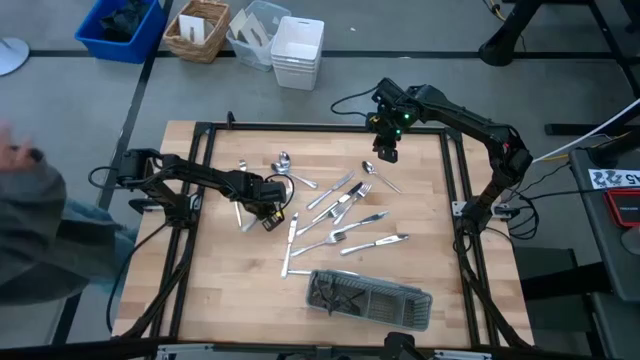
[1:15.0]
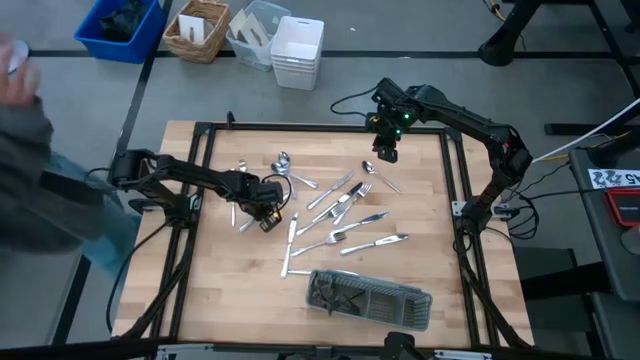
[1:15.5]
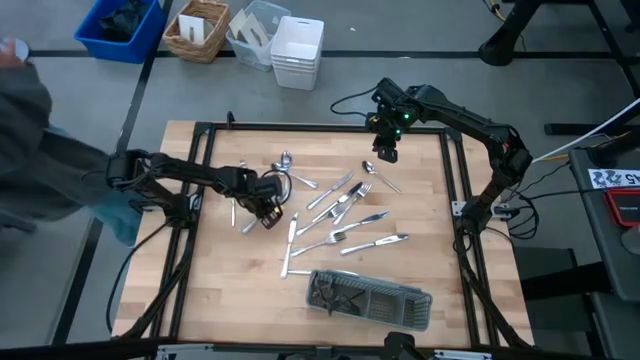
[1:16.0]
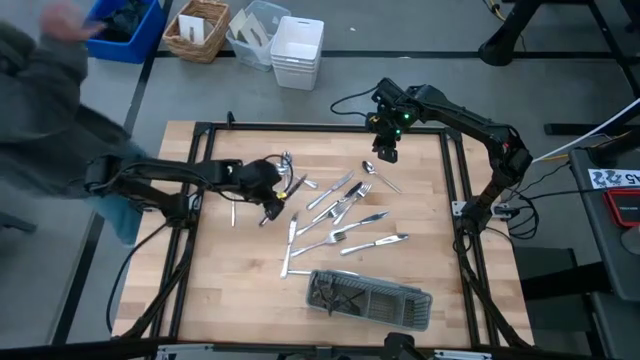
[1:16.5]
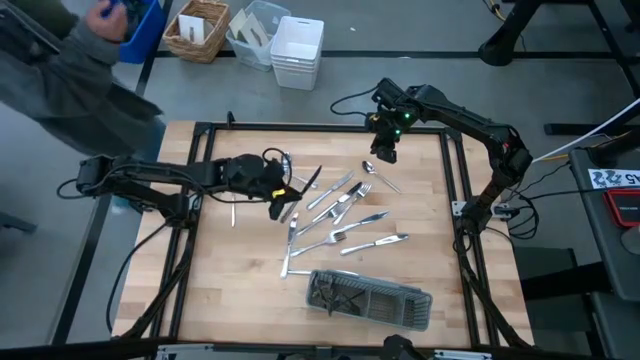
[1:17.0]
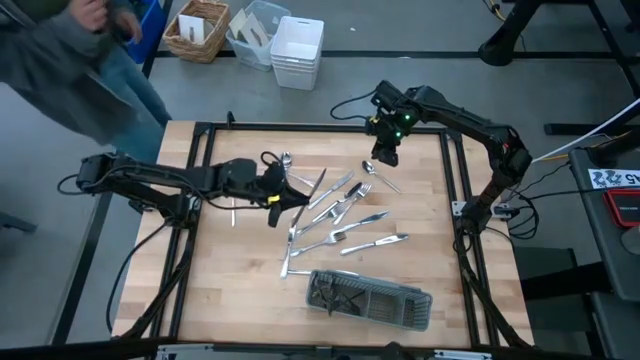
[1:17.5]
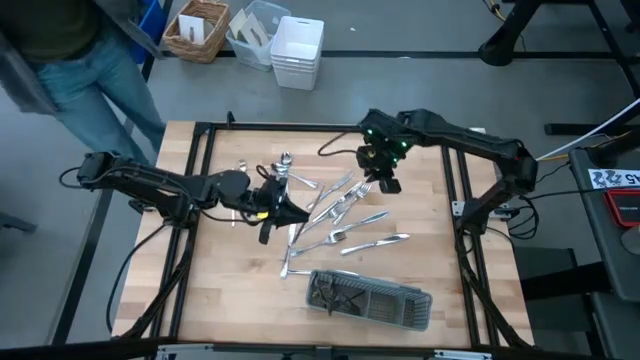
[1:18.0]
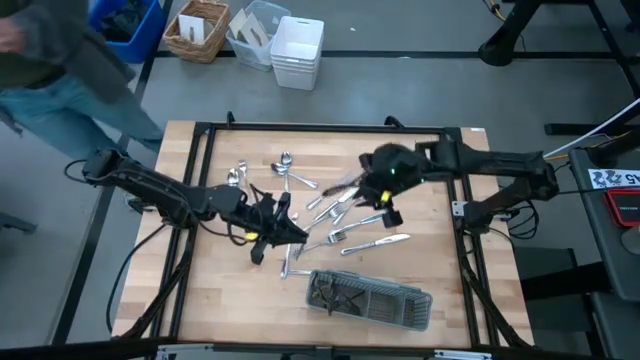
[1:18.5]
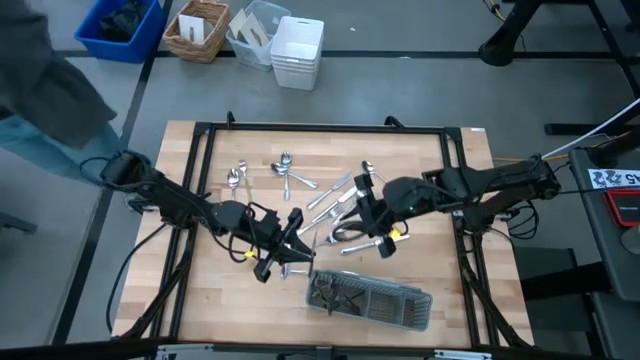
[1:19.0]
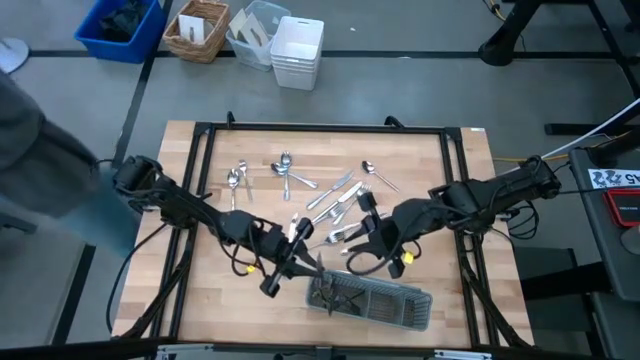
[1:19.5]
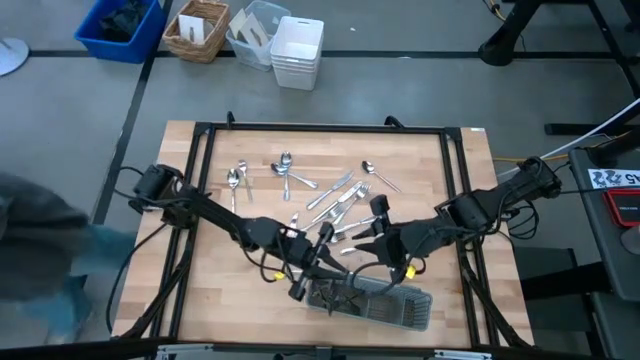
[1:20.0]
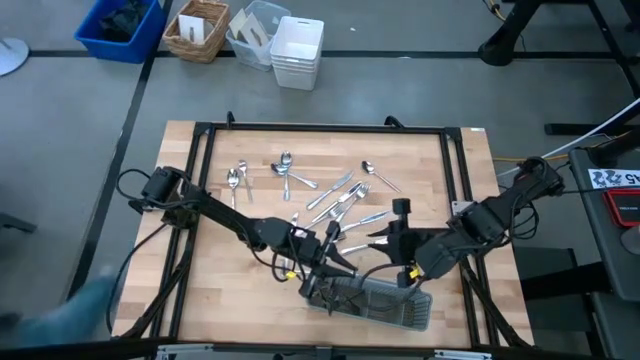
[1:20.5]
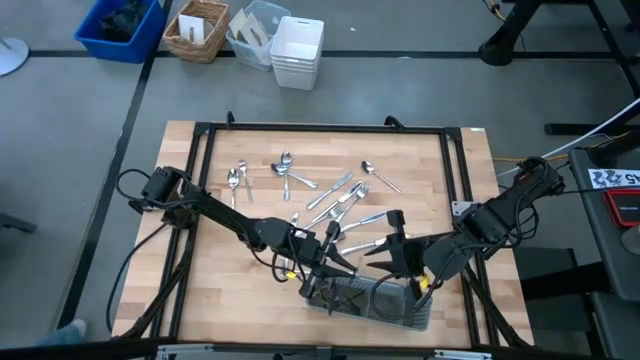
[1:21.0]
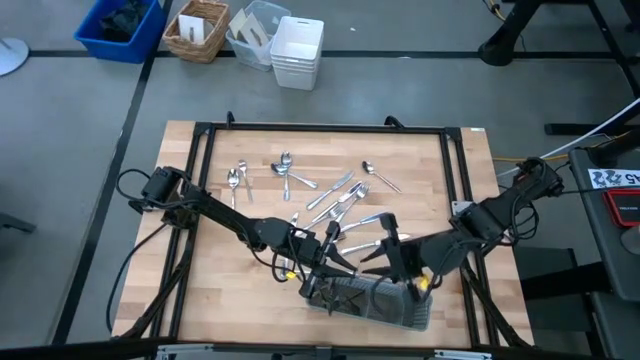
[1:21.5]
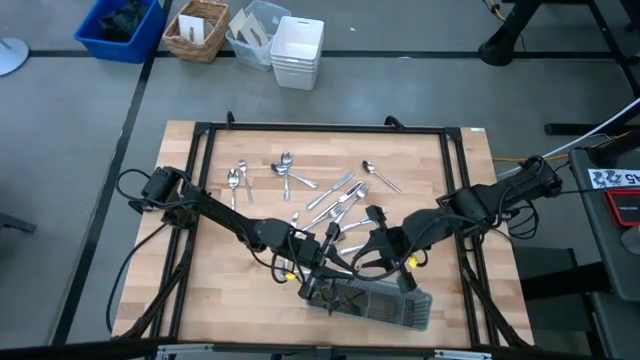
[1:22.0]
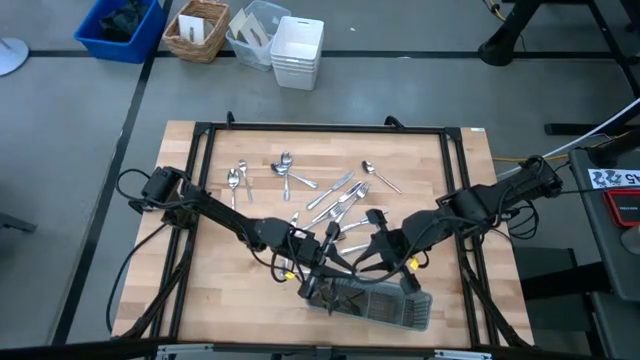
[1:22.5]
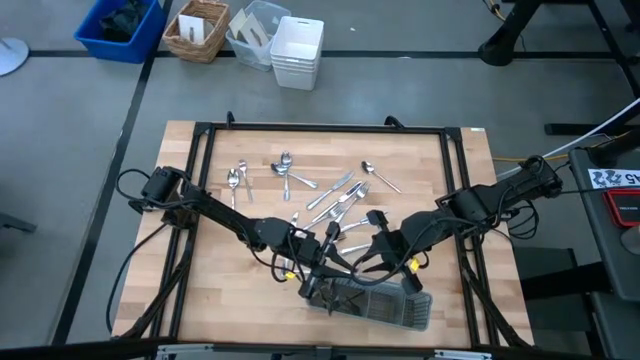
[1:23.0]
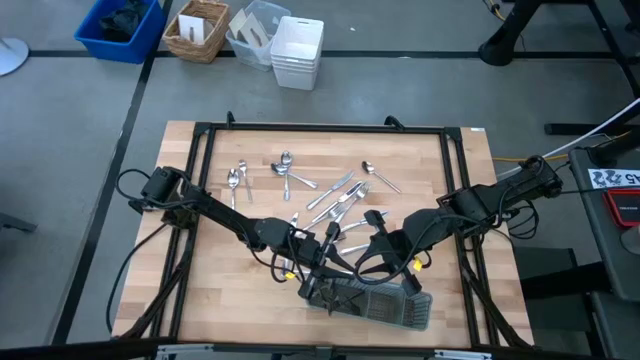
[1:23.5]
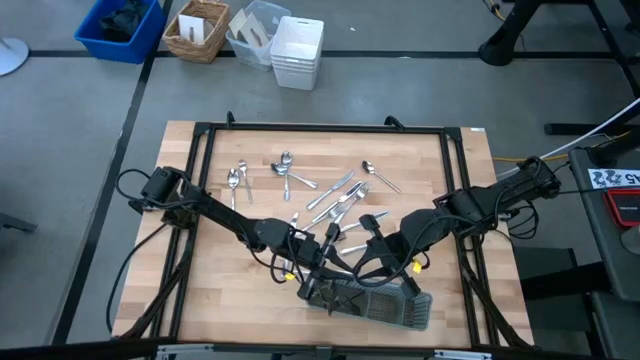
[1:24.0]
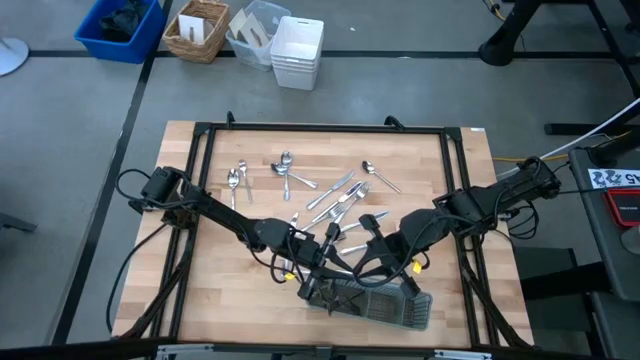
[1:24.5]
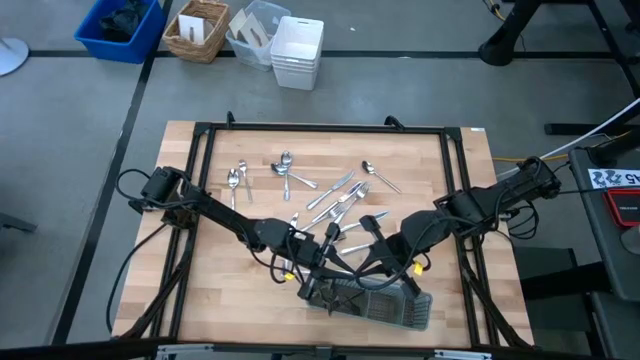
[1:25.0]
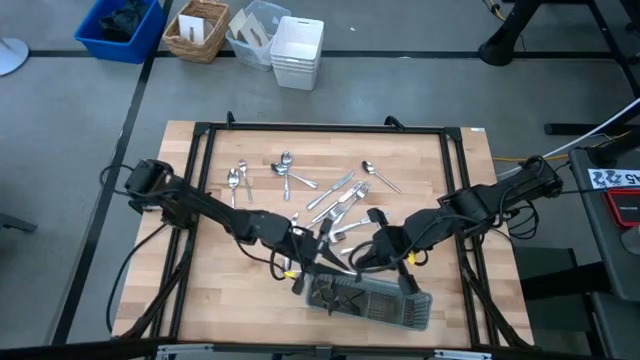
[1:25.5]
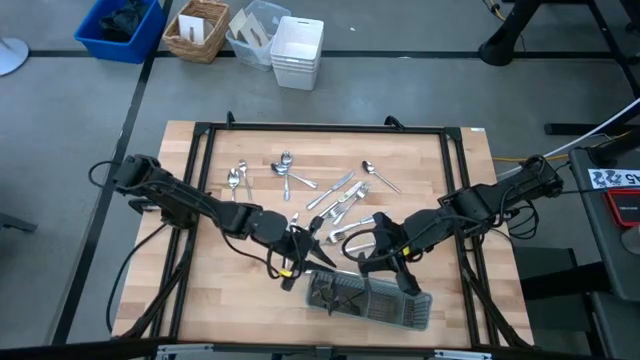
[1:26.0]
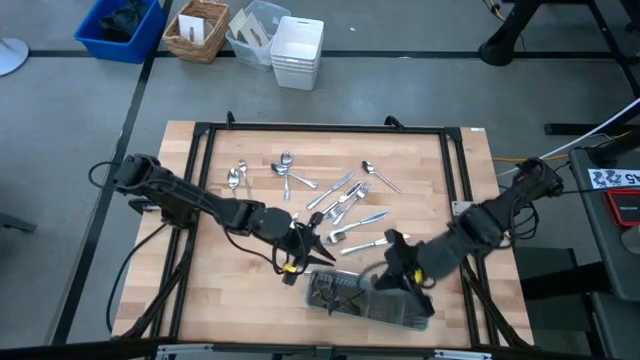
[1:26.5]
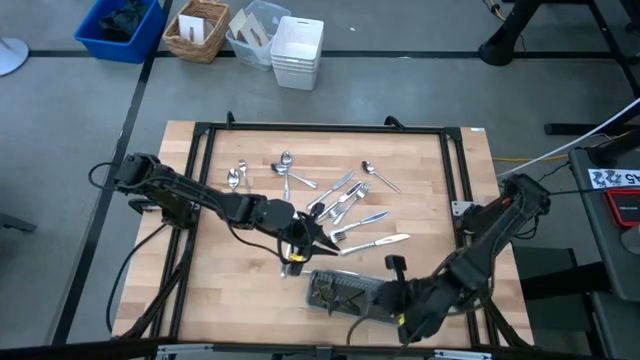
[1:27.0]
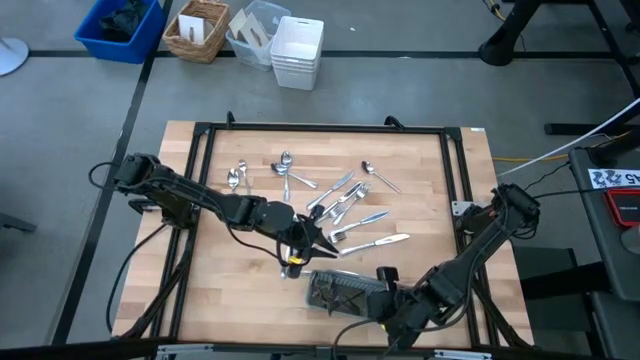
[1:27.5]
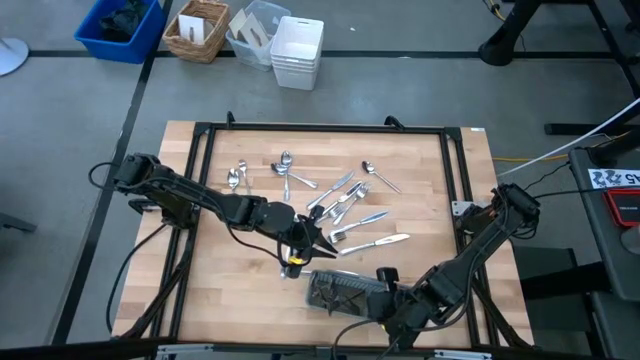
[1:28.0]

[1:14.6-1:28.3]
Task: Sort silverware
Put the knife into the gray silverware rack

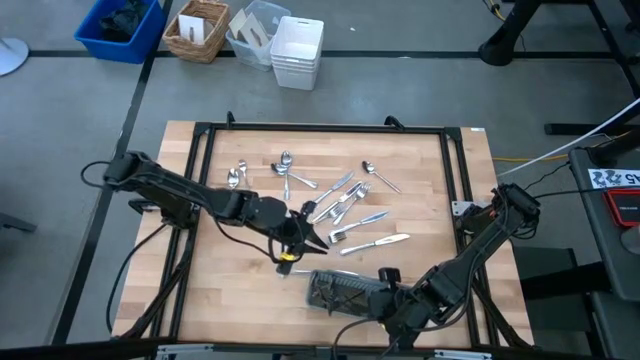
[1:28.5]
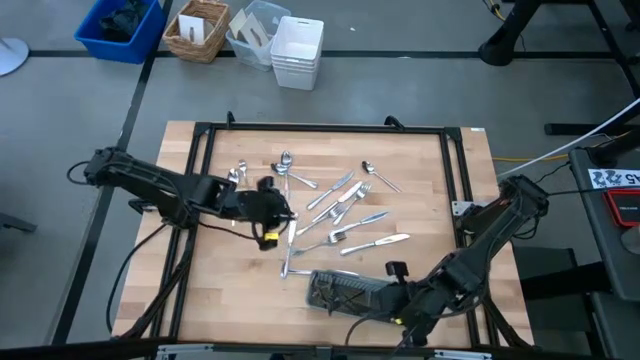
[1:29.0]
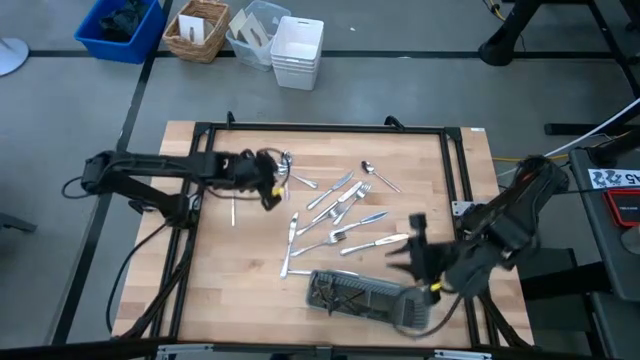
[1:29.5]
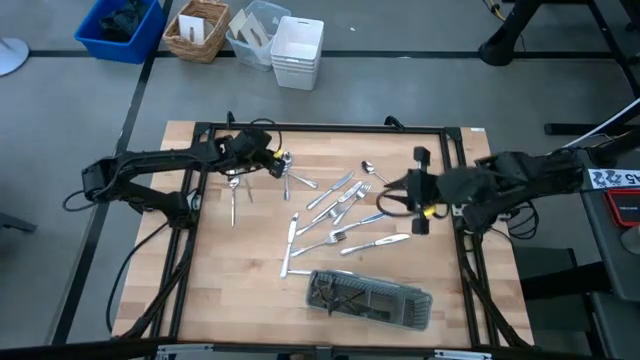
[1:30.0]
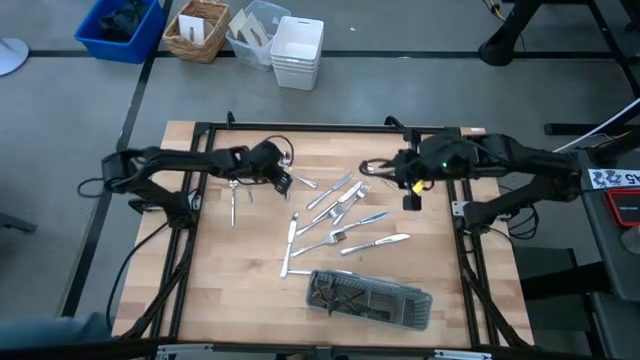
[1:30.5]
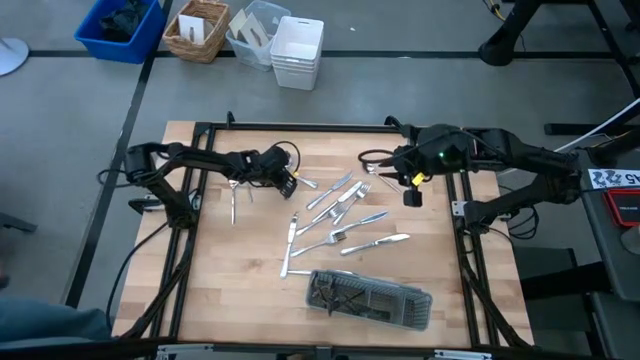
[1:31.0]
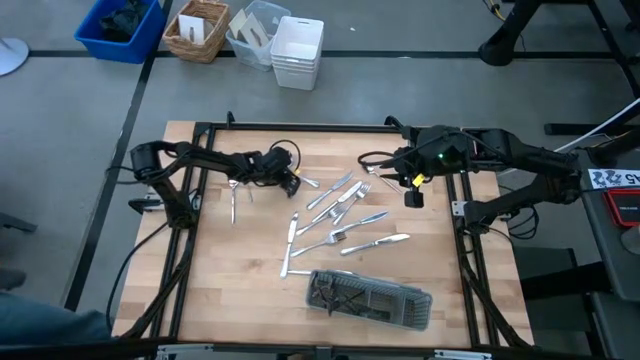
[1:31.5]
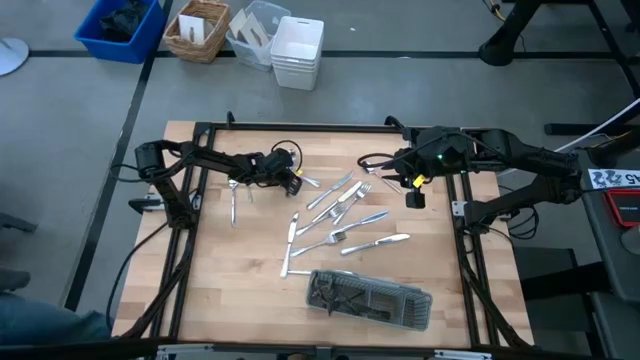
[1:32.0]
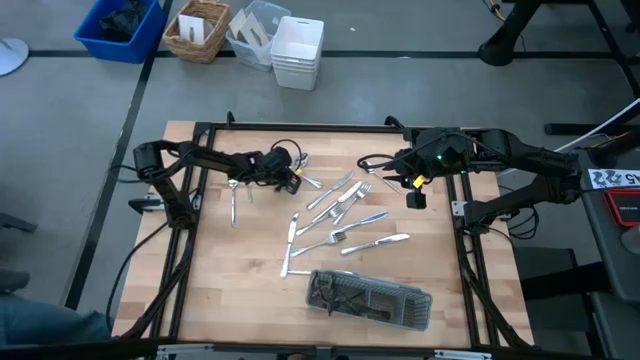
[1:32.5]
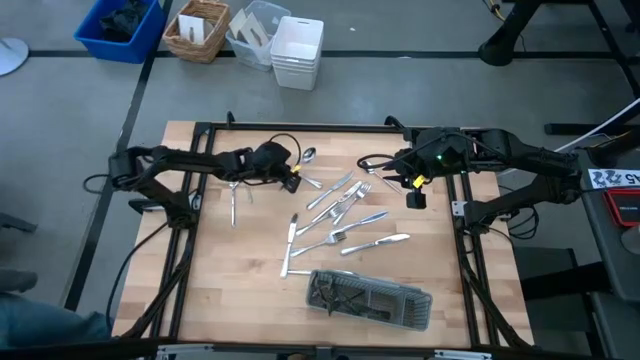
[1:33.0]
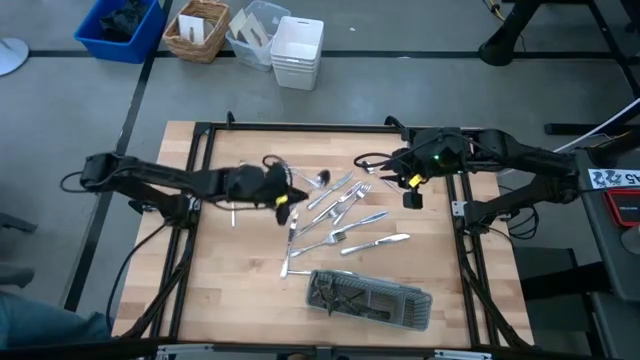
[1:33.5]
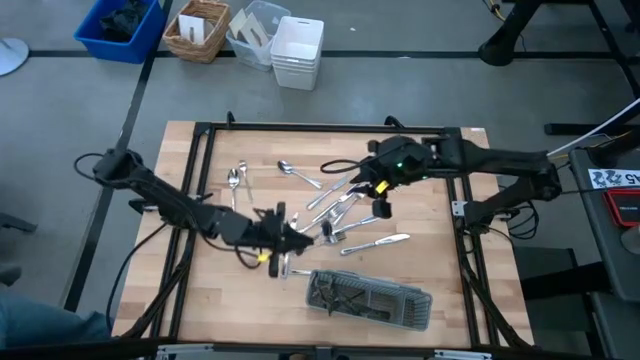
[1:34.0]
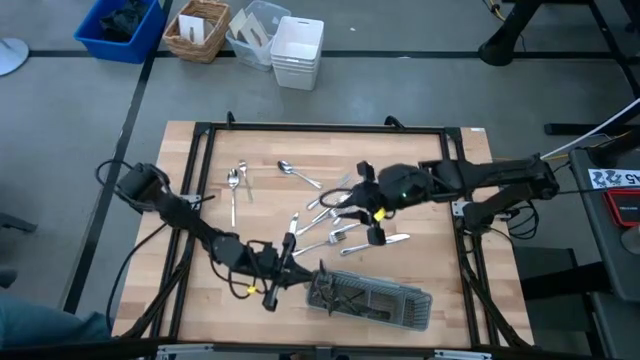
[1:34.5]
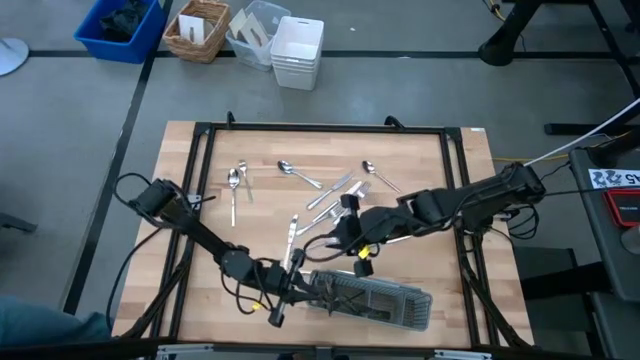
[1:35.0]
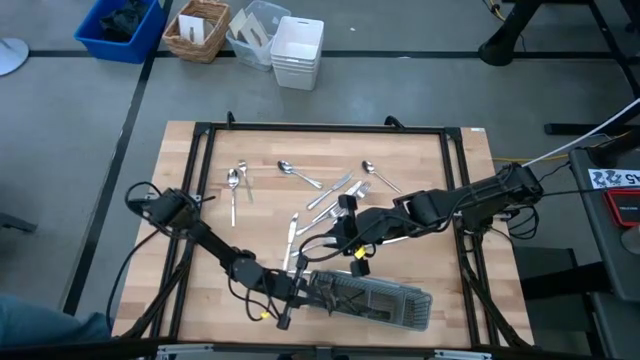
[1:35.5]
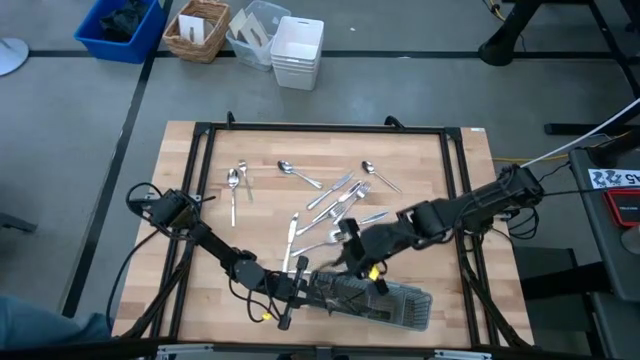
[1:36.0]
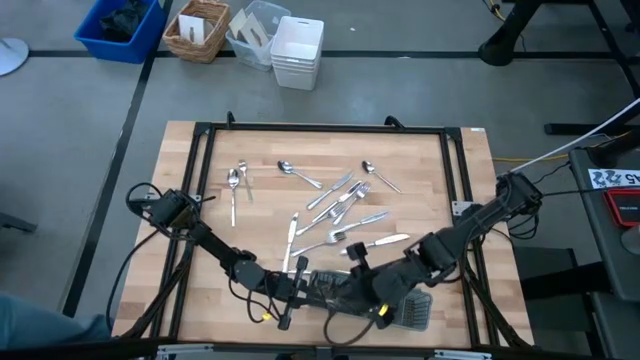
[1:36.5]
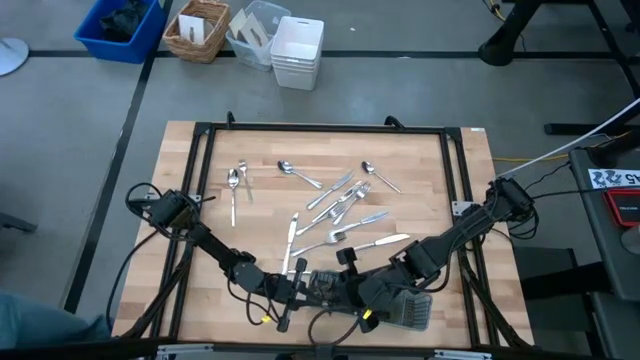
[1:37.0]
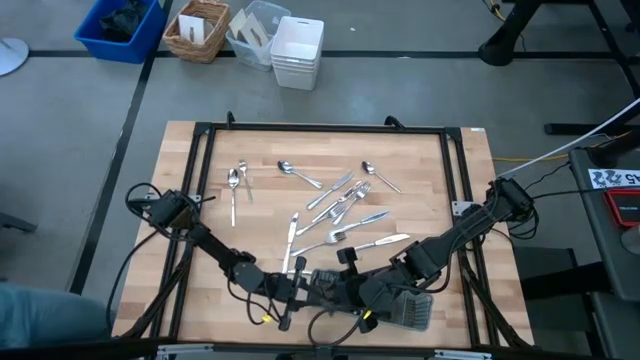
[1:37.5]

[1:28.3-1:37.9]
Put the spoon into the gray silverware rack

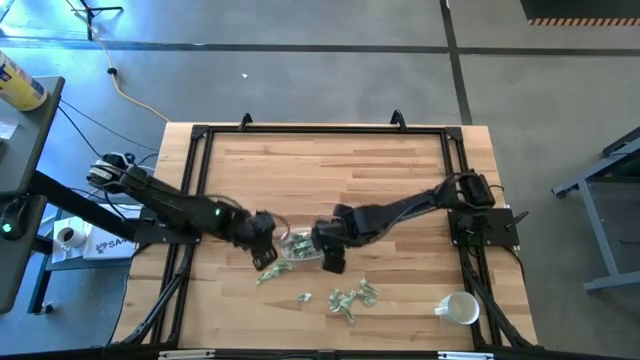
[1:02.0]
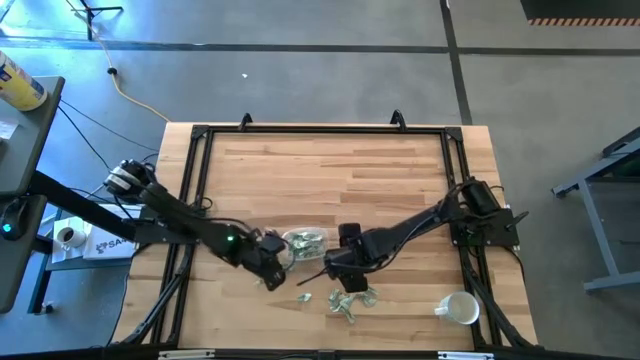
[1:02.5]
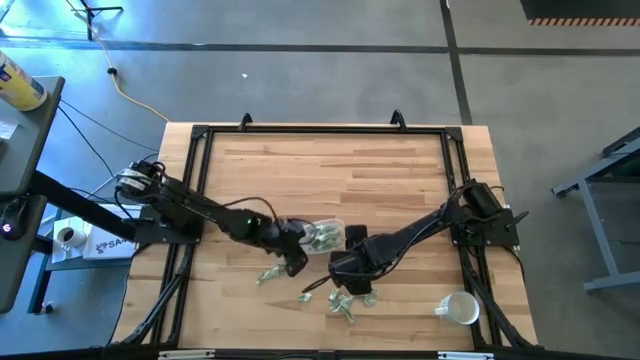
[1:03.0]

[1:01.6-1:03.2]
Task: Pick and place Stevia / Truvia into bins
Adjust the transparent bin
